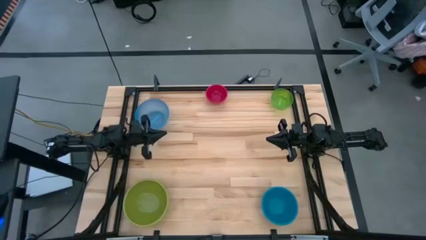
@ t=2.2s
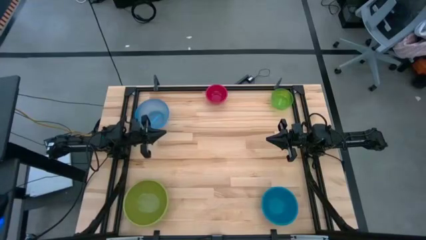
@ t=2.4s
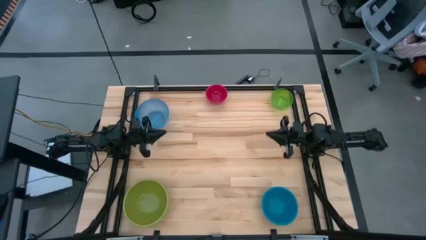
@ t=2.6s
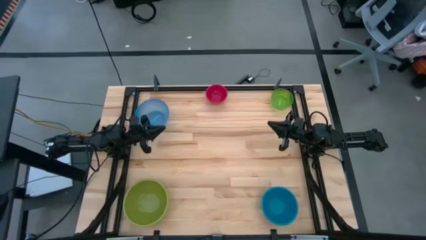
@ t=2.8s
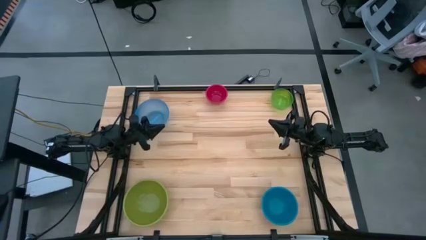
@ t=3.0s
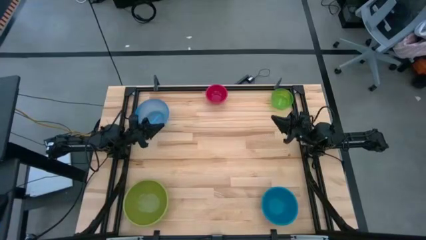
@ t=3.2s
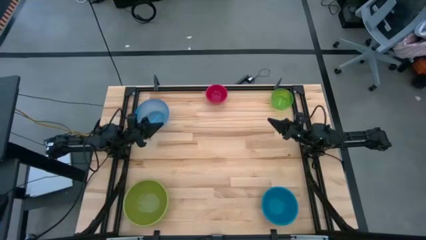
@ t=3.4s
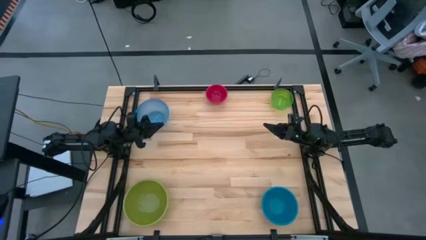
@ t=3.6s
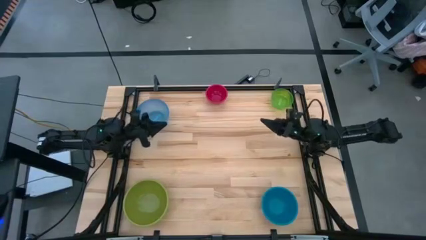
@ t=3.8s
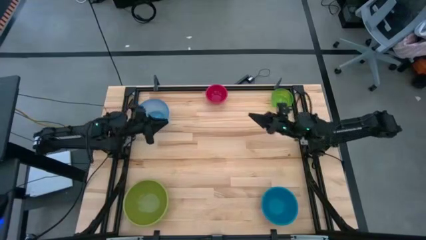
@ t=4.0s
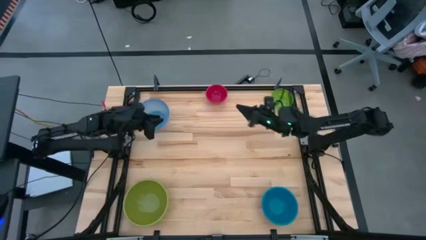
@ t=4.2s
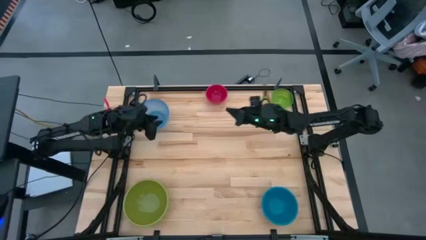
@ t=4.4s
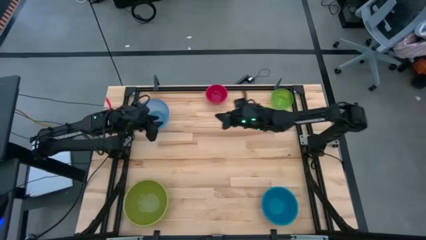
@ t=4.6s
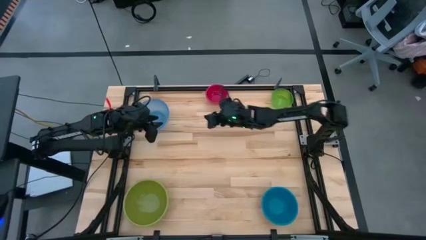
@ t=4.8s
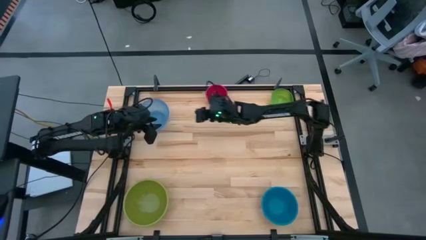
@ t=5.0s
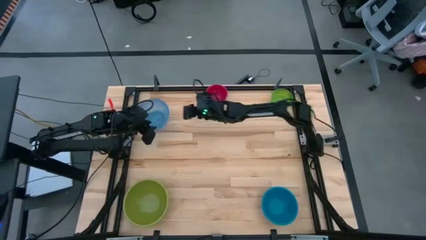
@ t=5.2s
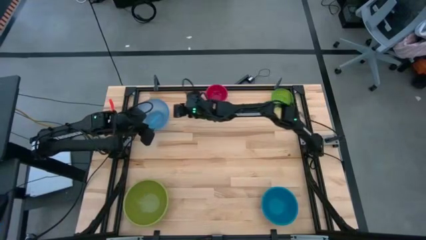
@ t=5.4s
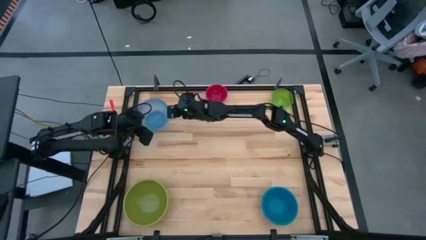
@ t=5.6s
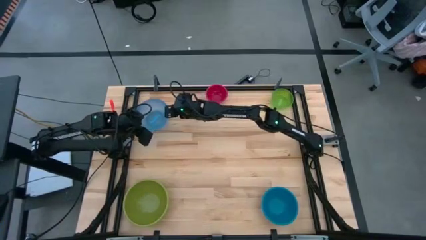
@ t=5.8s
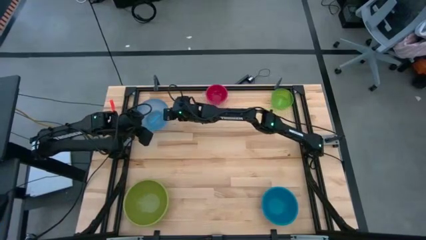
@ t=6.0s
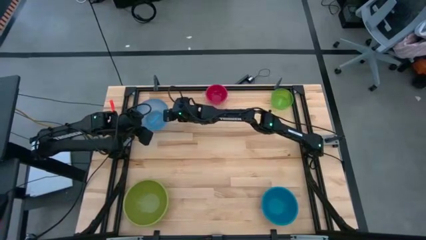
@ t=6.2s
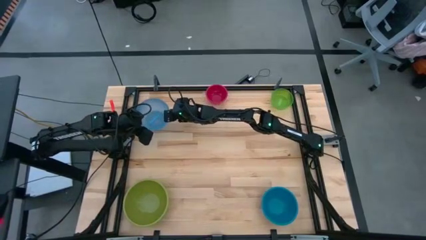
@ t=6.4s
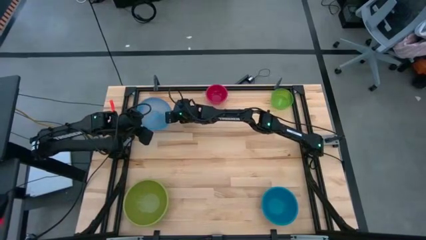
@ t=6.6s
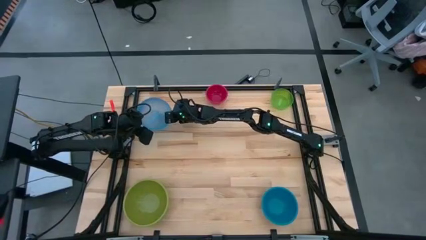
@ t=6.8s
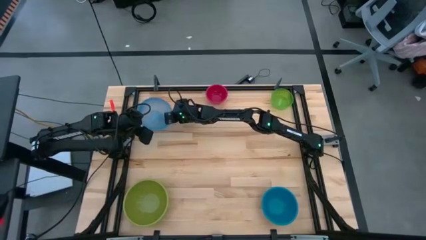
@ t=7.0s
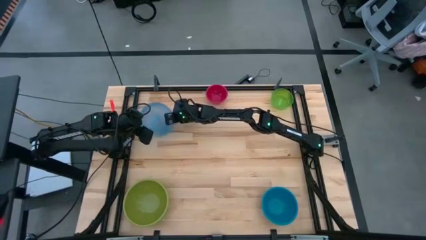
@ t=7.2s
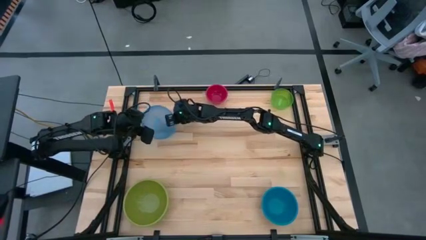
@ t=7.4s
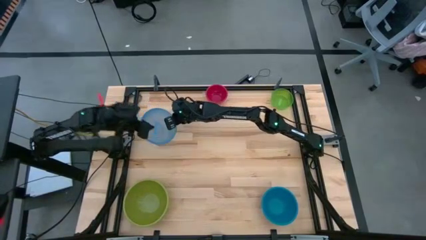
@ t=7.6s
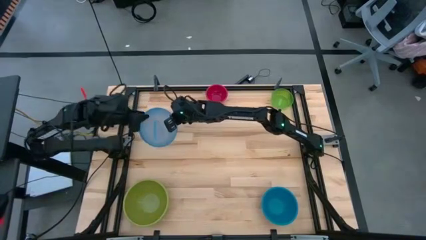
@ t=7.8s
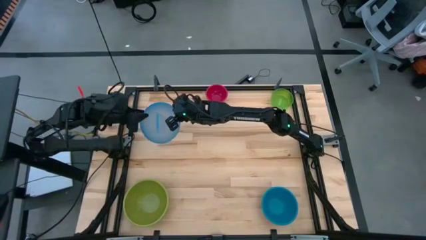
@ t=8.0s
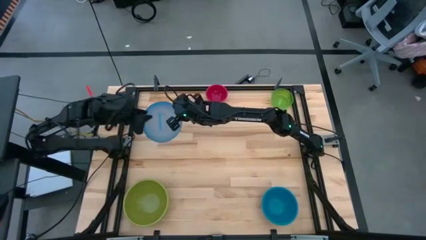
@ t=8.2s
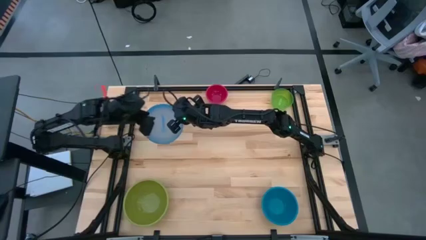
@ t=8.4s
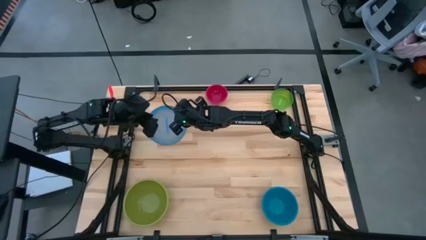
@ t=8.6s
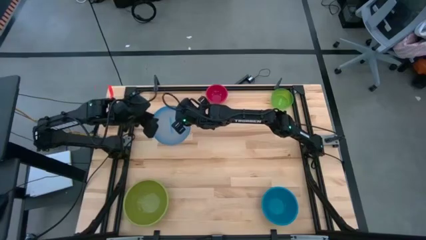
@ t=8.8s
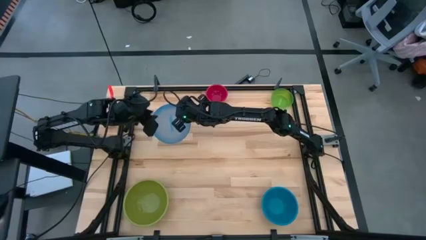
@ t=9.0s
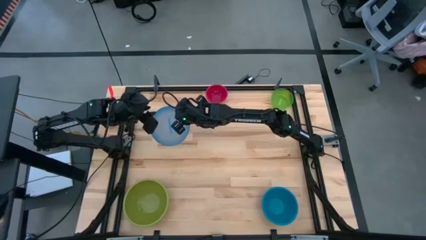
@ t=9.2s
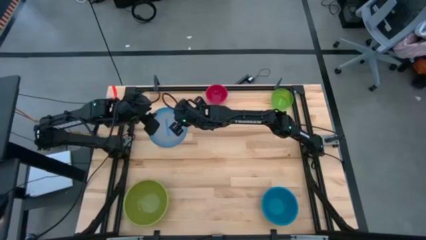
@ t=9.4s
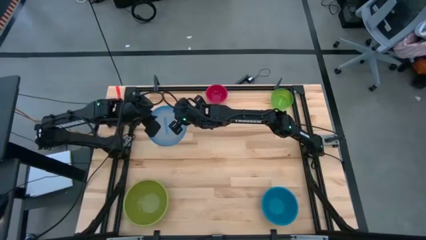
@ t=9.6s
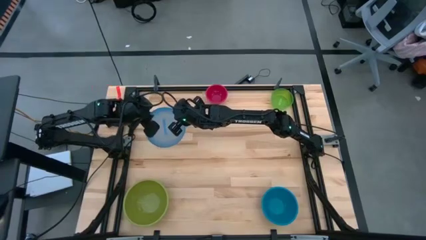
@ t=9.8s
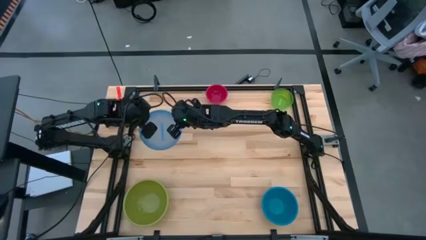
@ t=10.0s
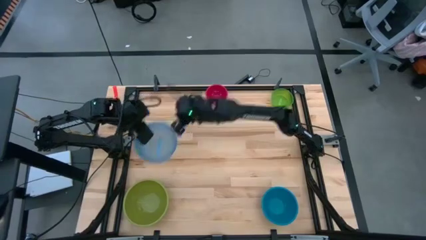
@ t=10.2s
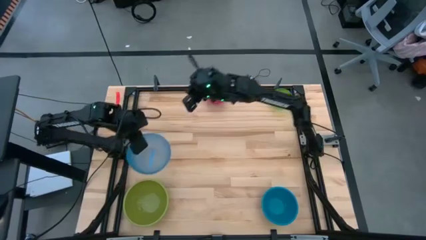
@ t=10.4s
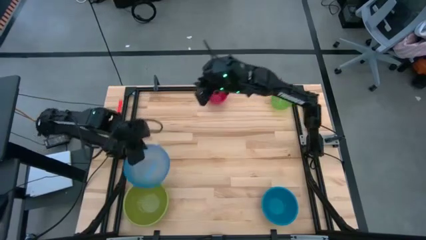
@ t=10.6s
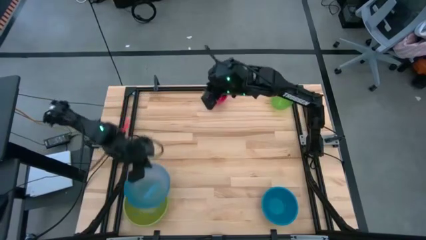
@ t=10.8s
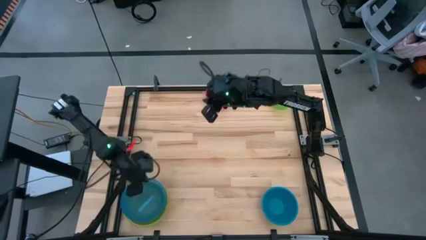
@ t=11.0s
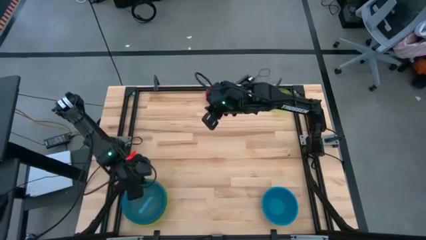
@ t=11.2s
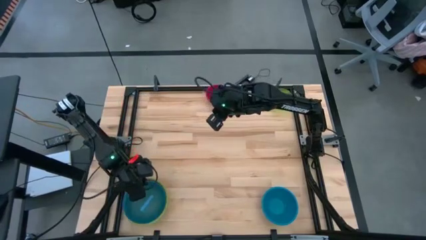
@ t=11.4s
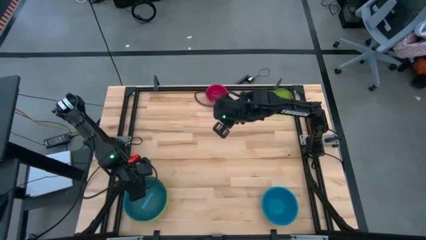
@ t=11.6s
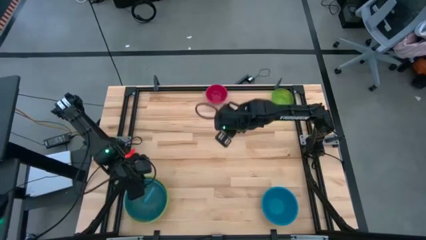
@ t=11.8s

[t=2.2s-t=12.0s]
Stack the light blue bowl on top of the light green bowl

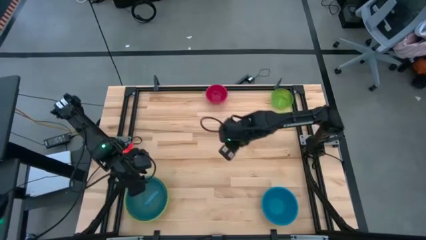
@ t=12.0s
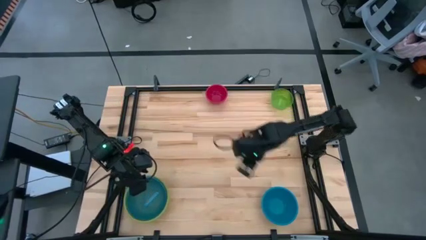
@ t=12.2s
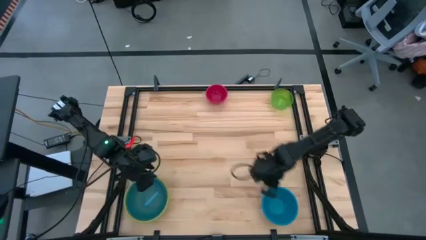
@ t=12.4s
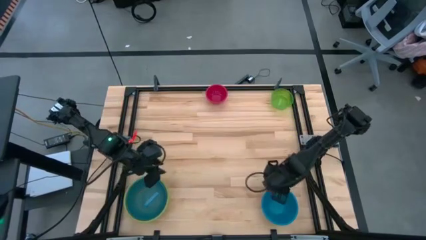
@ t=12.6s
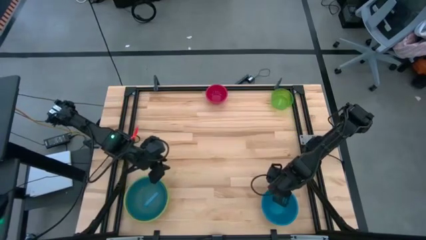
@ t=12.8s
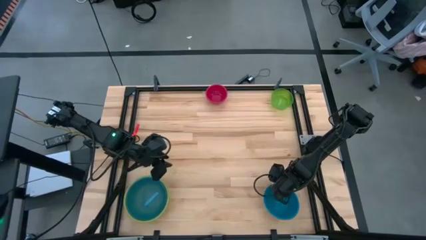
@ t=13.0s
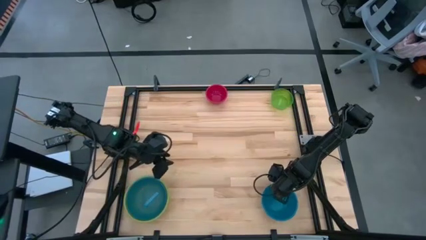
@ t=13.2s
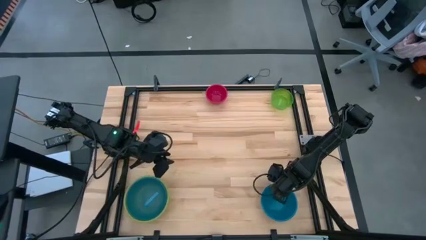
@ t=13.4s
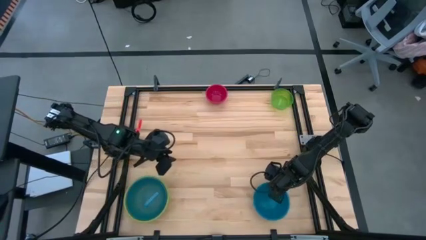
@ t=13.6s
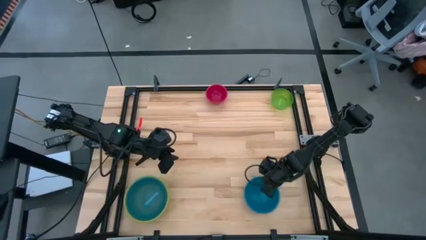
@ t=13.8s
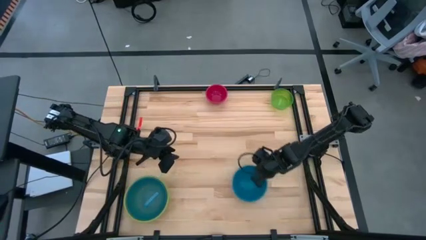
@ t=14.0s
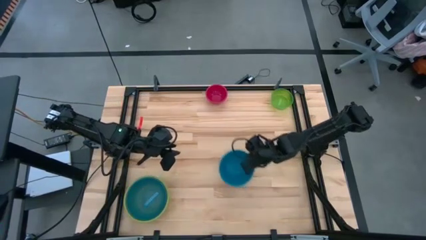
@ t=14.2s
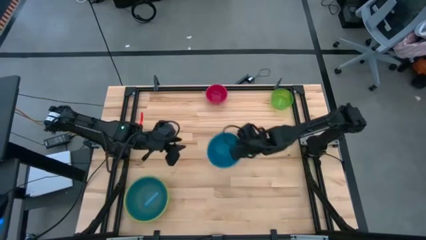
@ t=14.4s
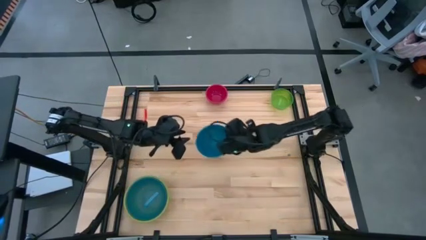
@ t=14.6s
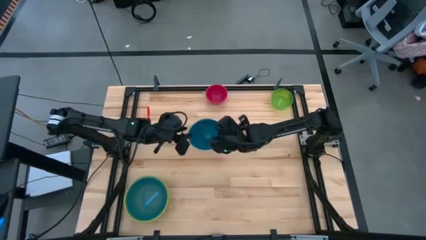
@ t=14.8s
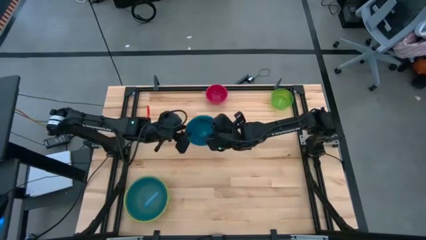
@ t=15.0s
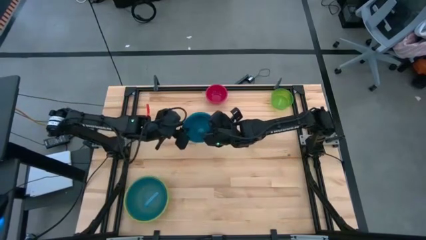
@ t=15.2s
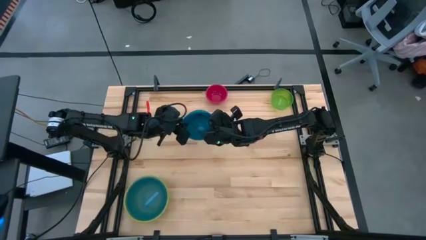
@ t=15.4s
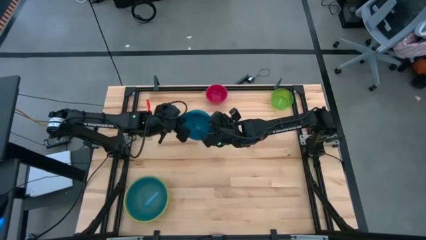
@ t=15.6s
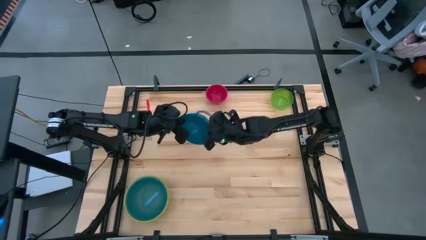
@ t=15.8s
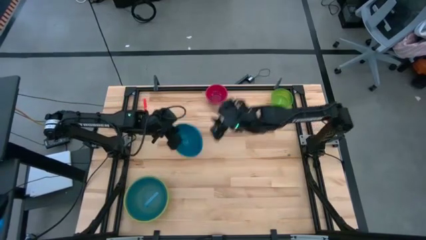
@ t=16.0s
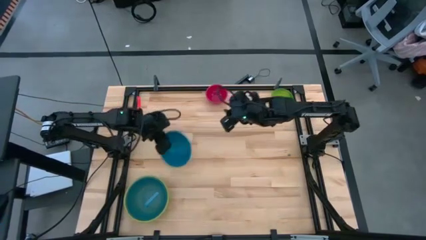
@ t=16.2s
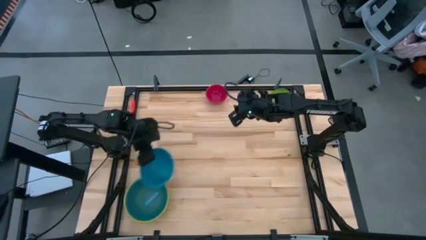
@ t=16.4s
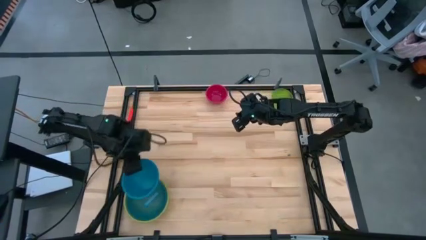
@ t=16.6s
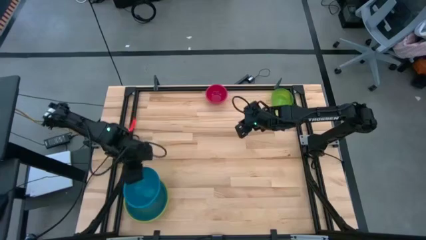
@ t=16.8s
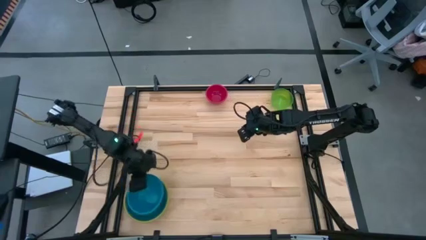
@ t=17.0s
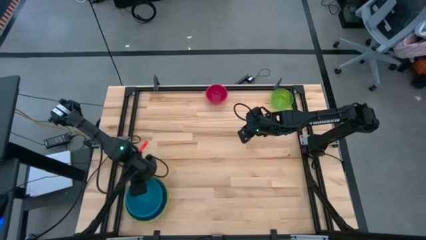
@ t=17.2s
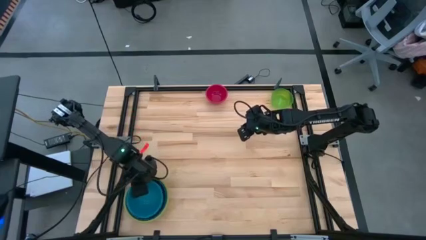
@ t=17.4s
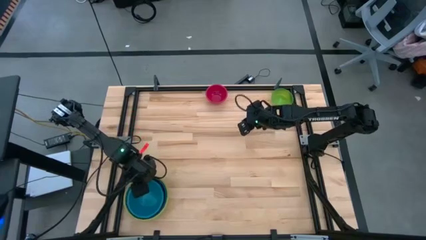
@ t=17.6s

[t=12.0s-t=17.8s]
Stack the blue bowl on top of the light blue bowl
